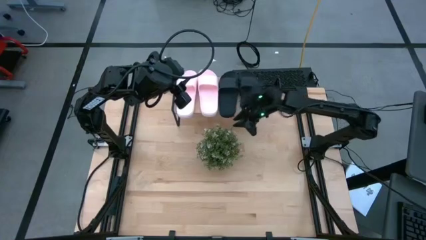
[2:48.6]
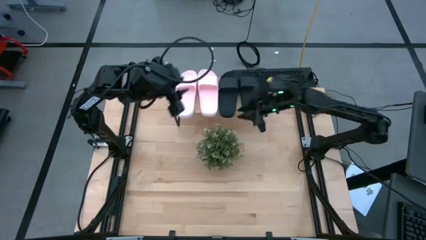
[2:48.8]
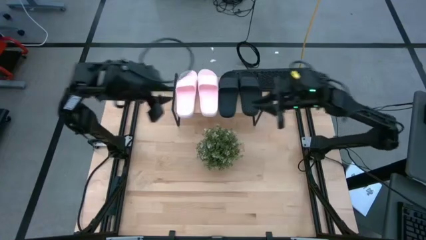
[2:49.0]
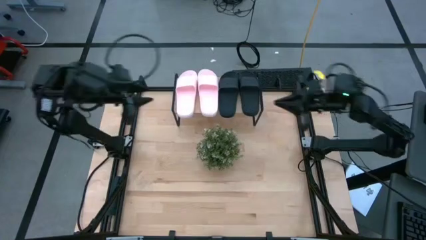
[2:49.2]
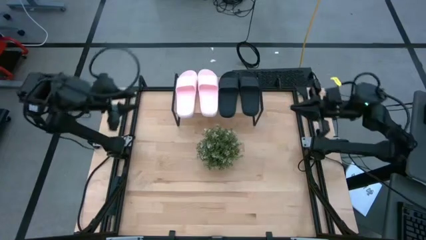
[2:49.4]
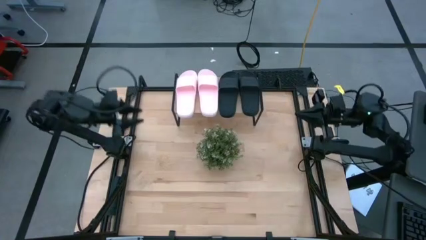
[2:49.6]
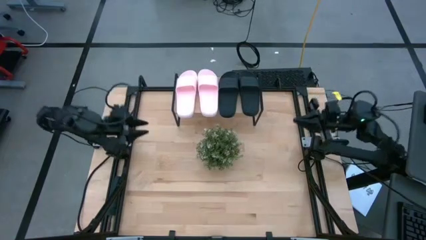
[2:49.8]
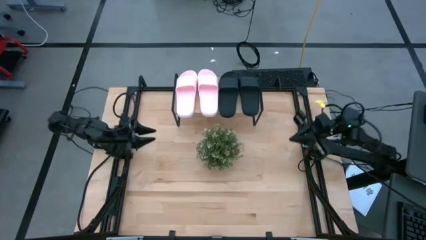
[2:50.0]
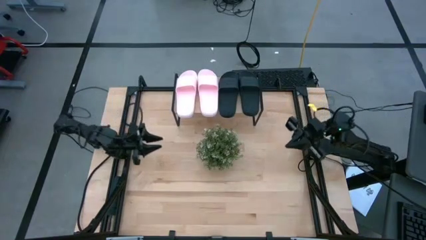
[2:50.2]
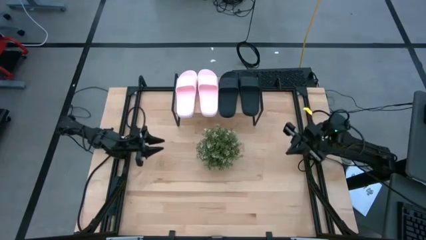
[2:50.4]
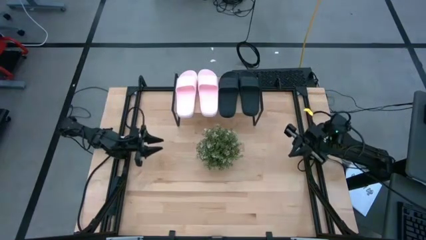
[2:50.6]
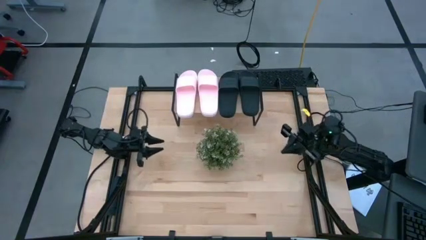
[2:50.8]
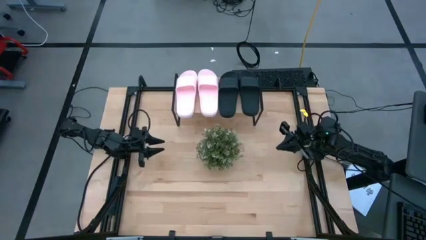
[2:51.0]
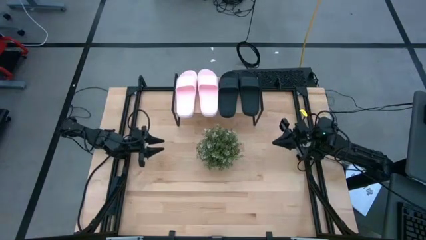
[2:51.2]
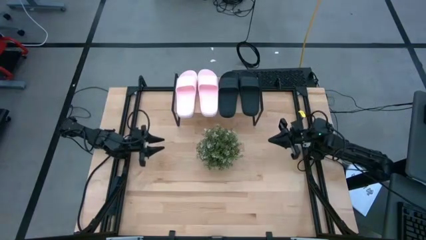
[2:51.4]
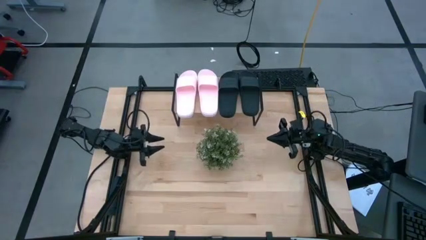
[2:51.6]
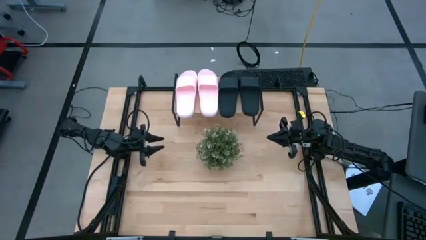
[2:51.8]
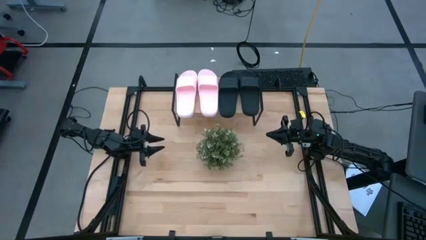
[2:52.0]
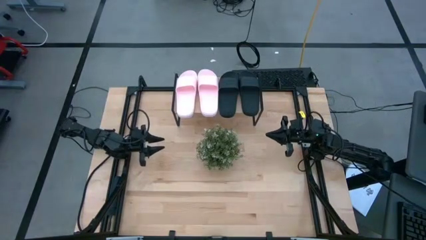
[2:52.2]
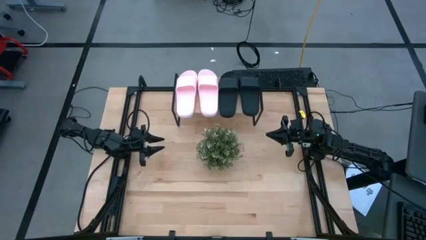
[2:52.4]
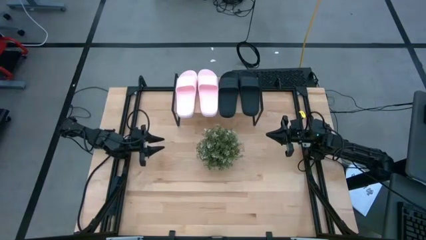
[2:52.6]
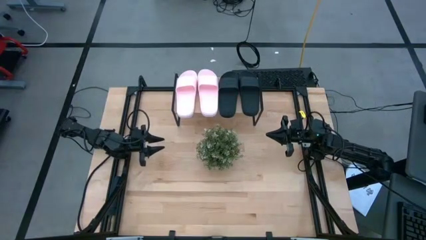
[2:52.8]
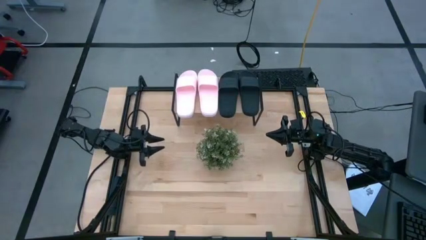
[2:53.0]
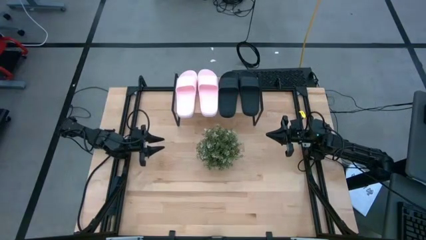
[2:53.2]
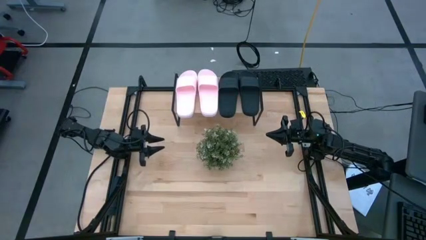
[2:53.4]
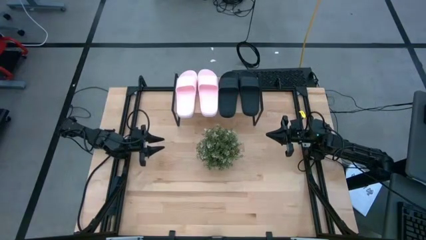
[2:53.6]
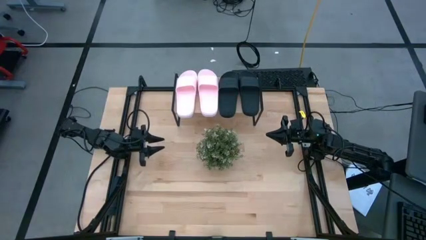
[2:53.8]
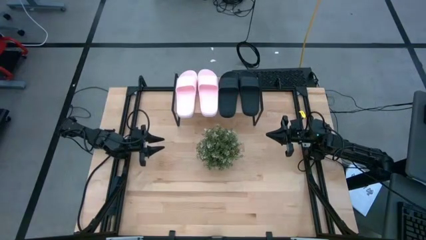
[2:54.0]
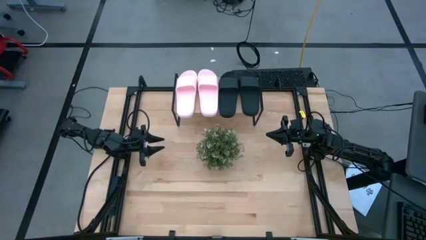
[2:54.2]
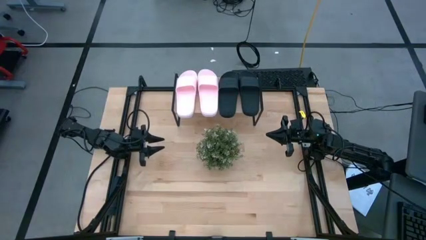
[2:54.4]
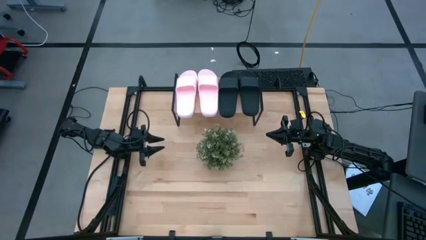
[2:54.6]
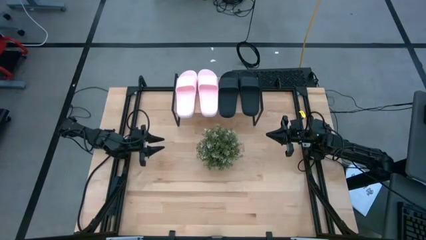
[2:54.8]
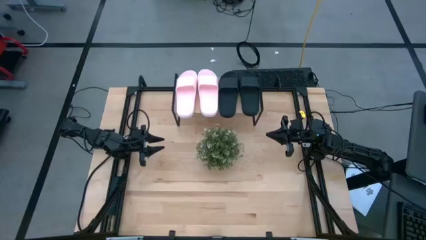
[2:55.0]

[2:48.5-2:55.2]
Task: Pick and place slides into the shelf
Return to Home Position

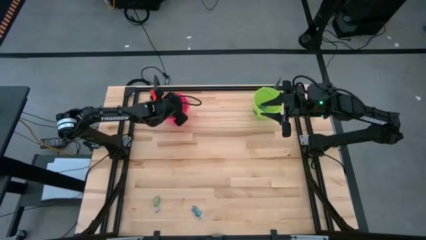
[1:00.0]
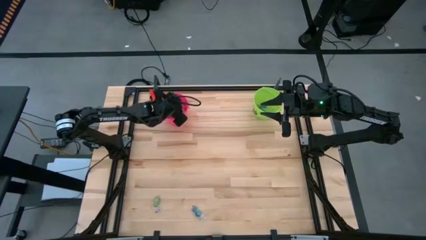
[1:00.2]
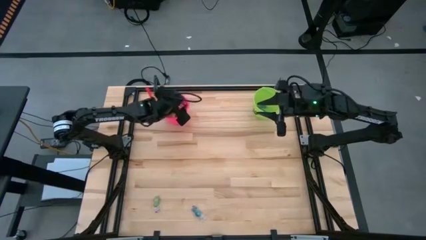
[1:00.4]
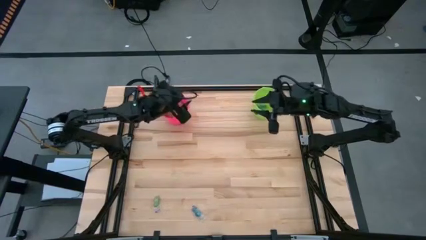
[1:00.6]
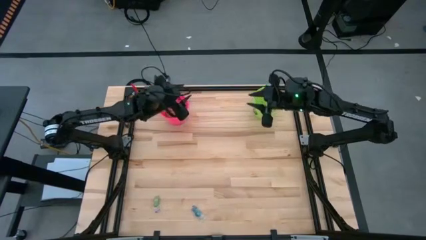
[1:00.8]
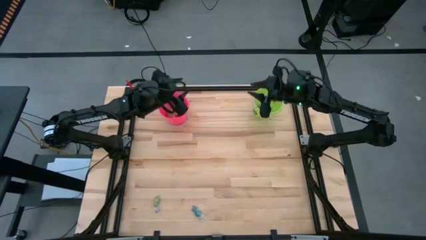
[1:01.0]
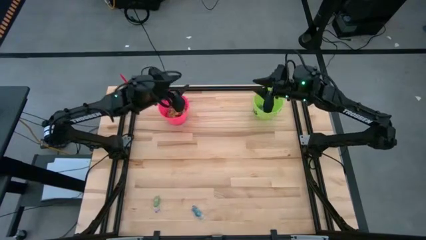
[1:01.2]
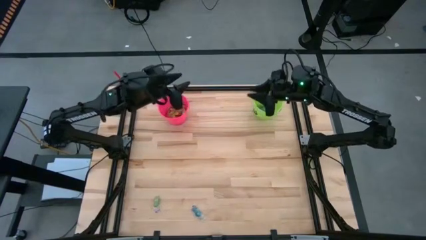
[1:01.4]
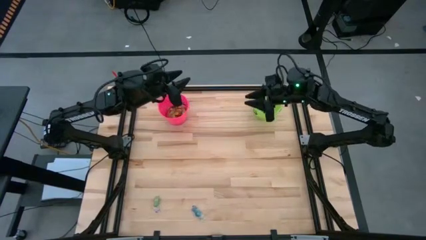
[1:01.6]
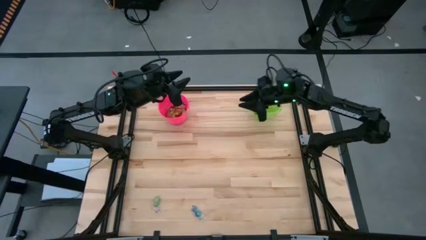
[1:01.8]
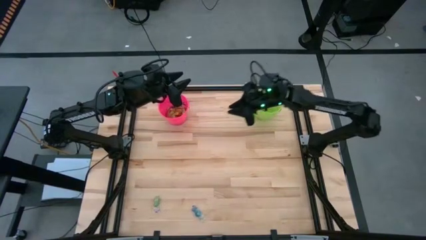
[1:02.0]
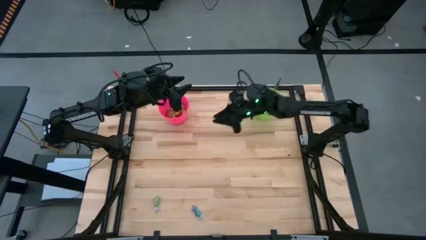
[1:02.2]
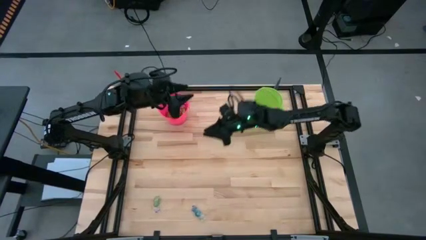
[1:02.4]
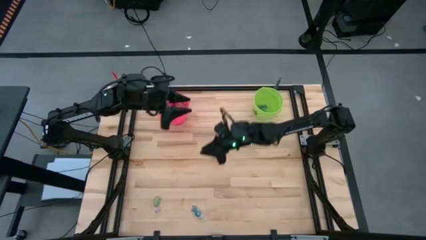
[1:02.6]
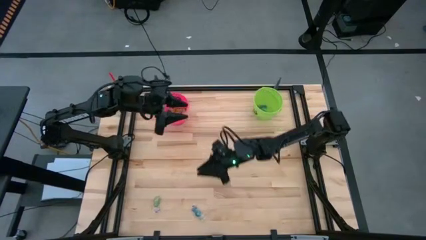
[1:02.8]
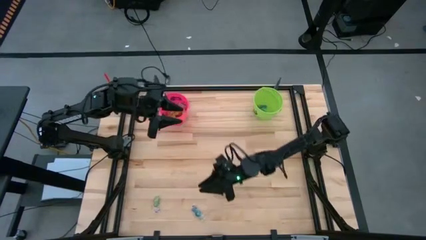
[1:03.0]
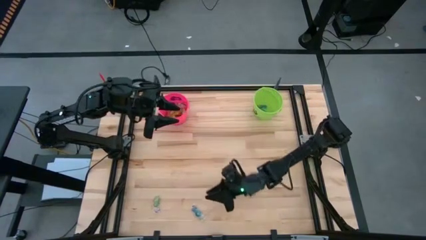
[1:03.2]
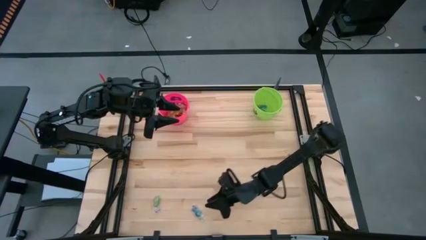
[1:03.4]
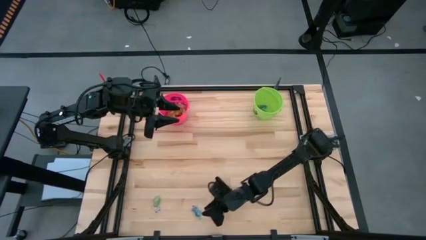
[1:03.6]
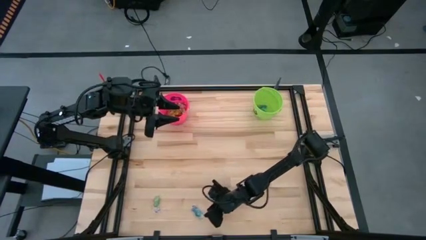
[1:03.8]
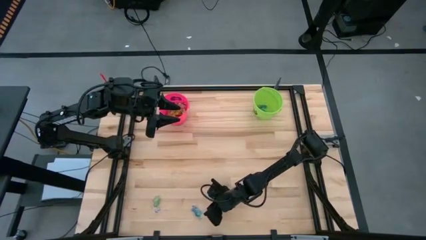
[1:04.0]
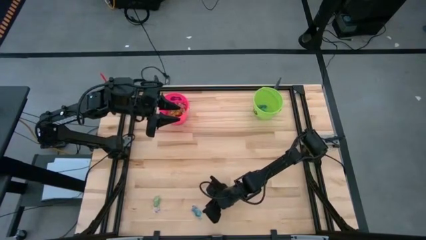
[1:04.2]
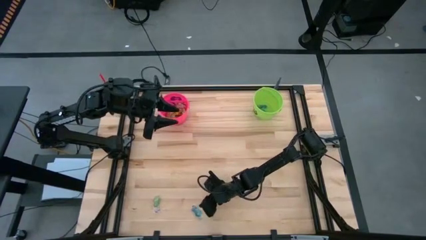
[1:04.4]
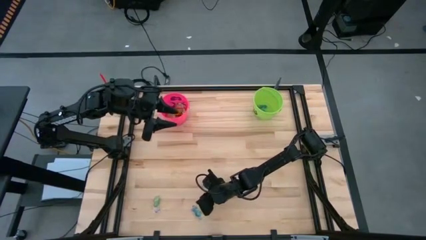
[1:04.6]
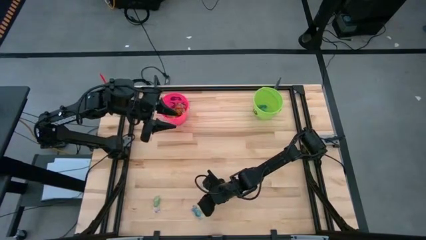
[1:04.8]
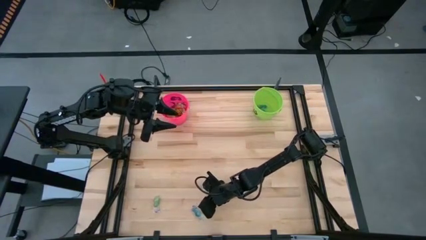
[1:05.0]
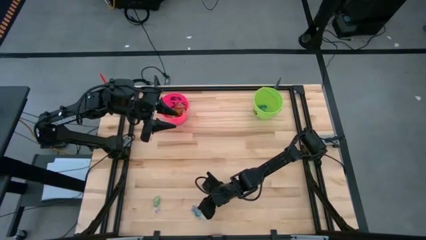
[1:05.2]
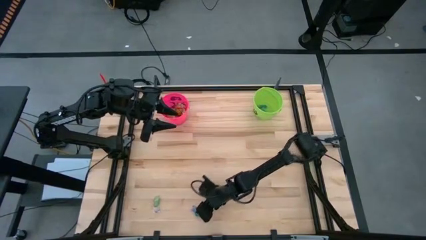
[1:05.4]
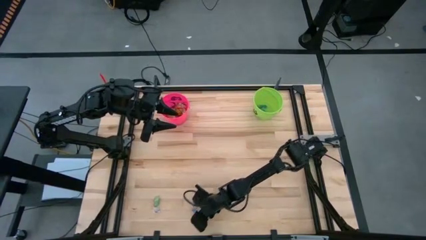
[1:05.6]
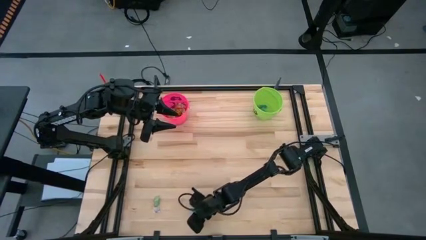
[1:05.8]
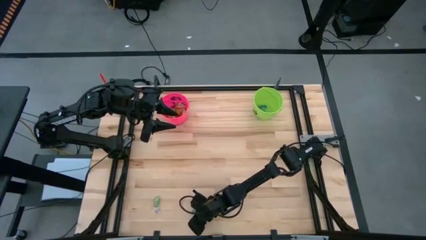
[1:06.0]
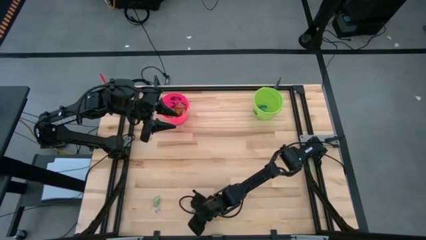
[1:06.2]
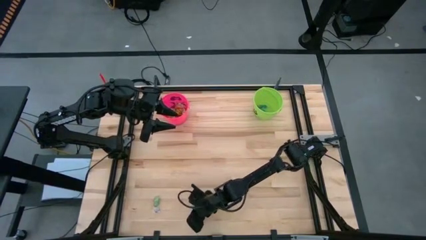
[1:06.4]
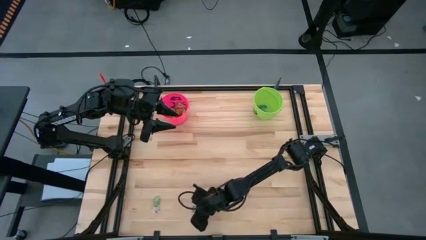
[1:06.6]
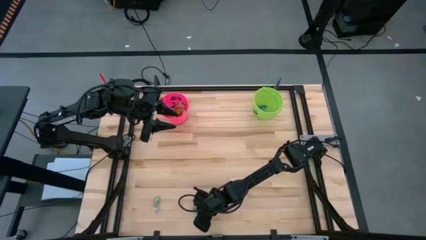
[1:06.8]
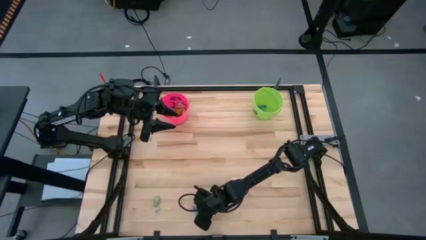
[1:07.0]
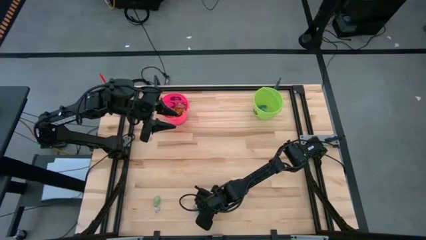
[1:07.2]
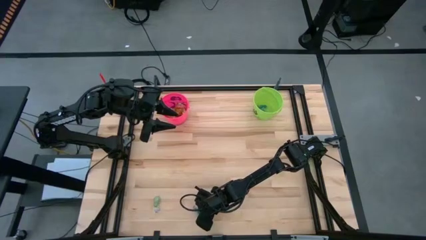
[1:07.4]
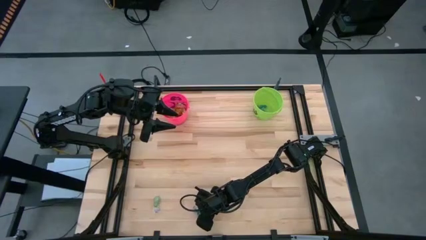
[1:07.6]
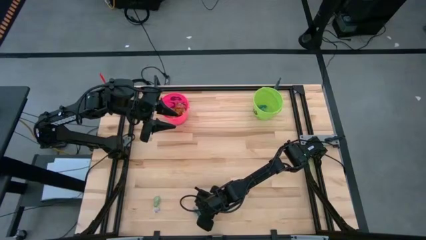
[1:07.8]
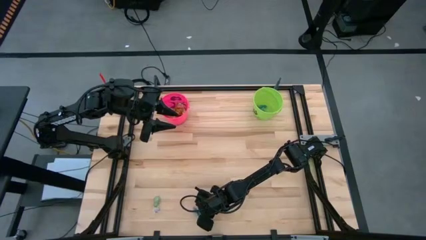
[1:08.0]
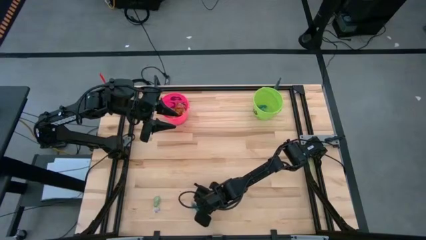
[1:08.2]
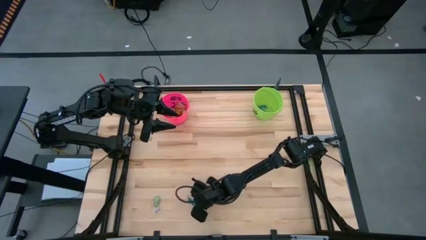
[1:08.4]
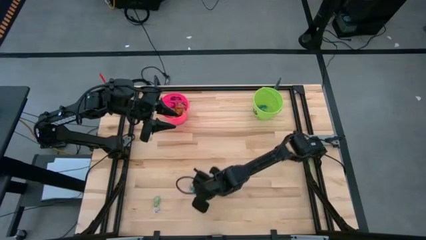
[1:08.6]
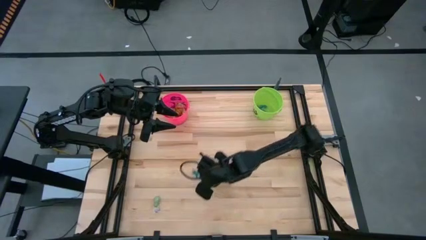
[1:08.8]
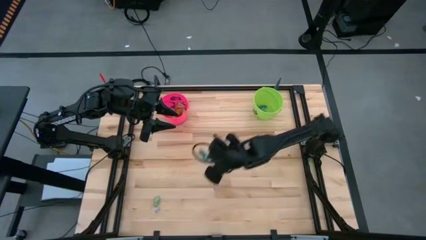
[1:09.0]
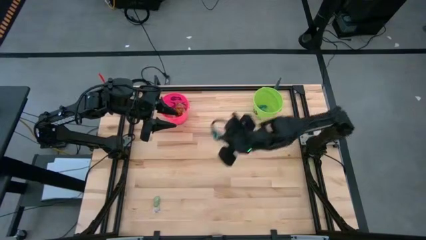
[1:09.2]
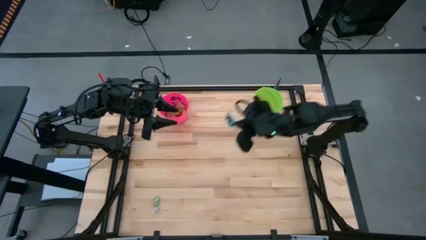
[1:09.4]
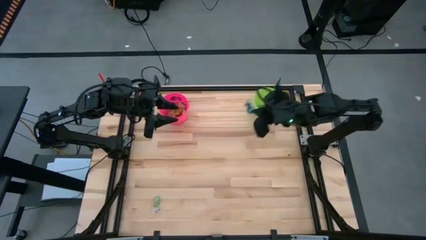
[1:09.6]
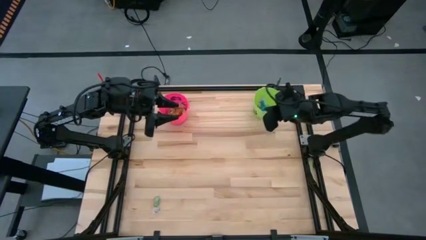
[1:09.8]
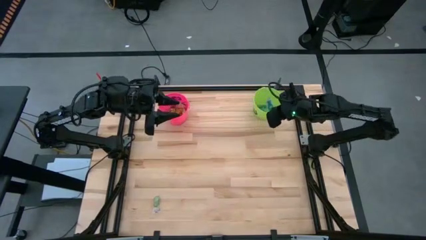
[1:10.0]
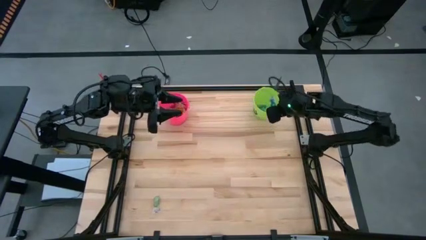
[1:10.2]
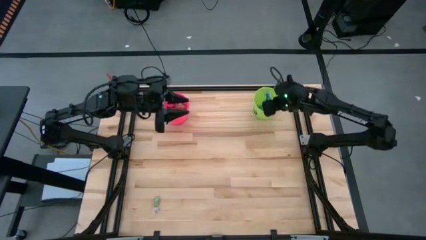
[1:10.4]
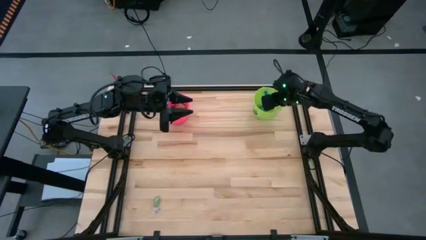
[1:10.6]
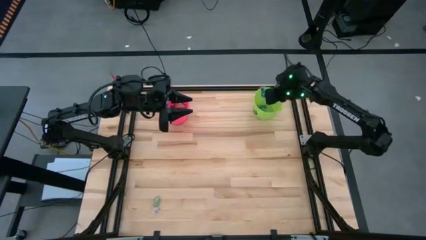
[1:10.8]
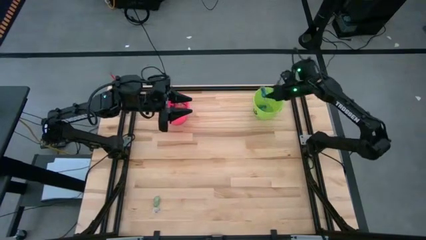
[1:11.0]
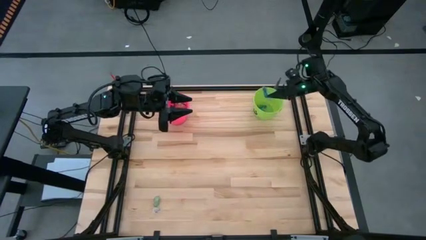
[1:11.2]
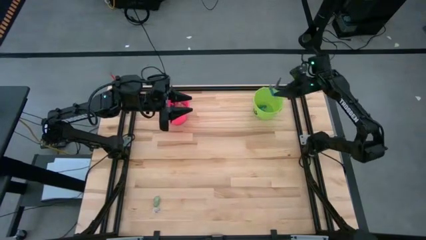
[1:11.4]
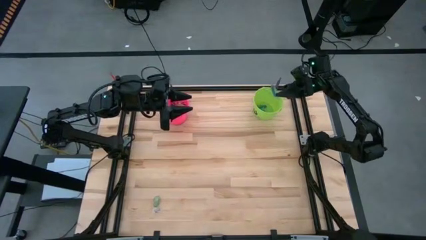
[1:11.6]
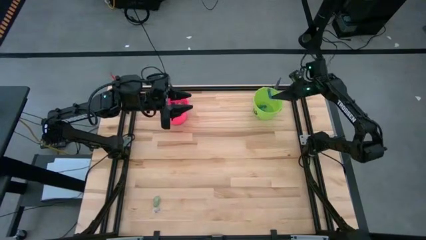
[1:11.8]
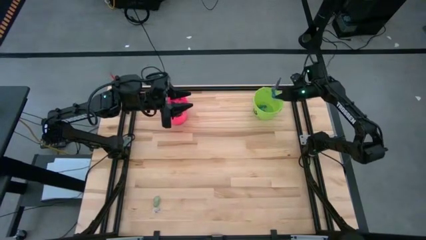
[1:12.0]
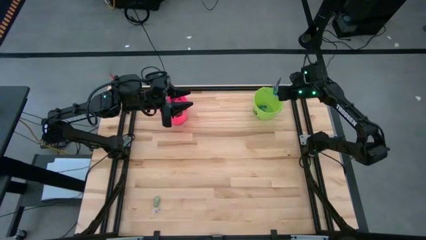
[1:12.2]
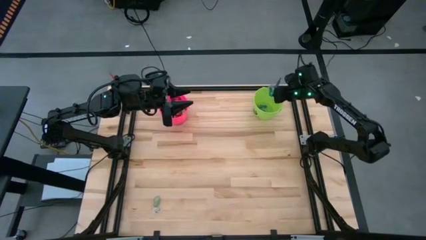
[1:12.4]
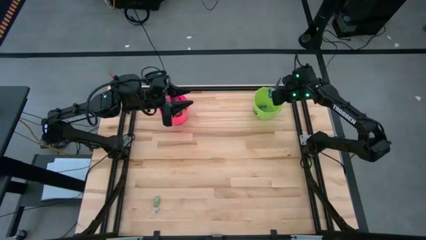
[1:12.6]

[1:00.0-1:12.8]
Task: Sort candy by brand, put in halloween buckets
Put the blue candy into the green bucket
